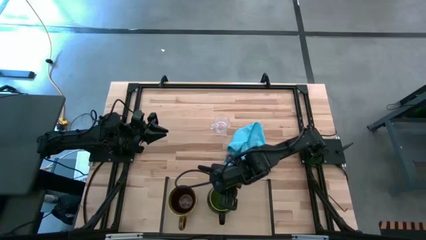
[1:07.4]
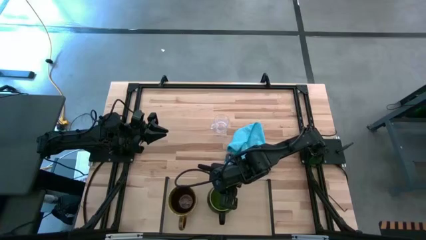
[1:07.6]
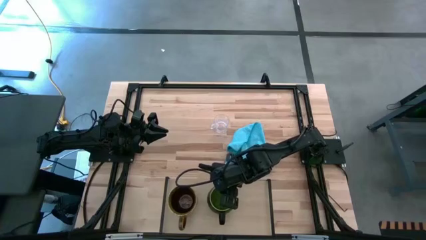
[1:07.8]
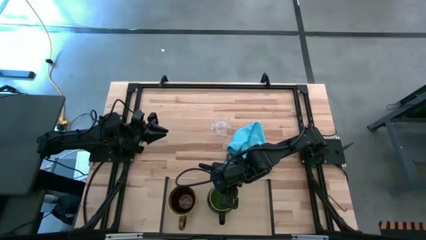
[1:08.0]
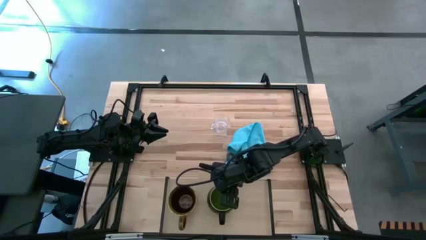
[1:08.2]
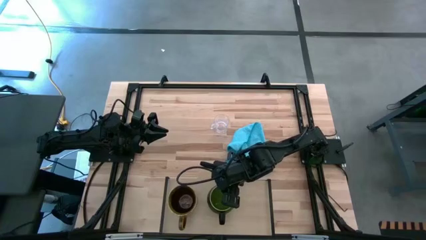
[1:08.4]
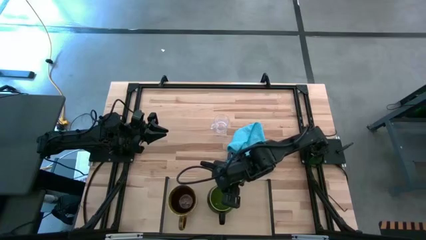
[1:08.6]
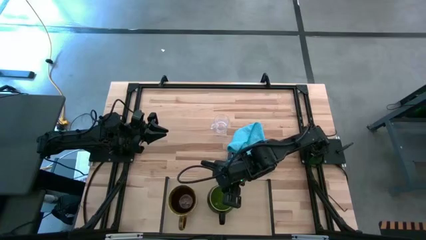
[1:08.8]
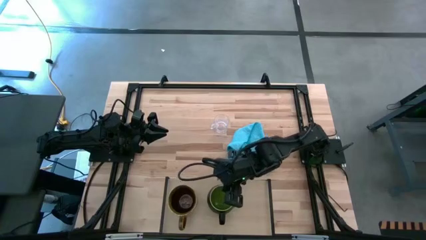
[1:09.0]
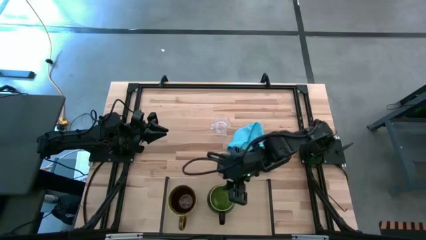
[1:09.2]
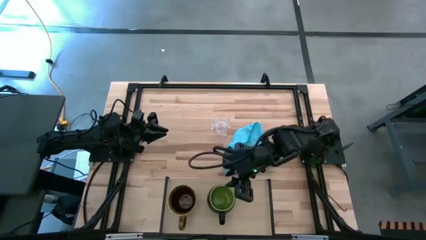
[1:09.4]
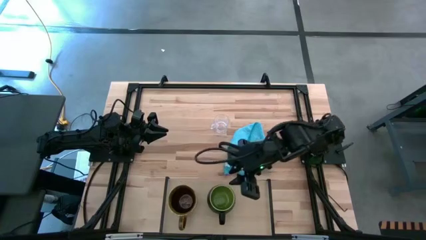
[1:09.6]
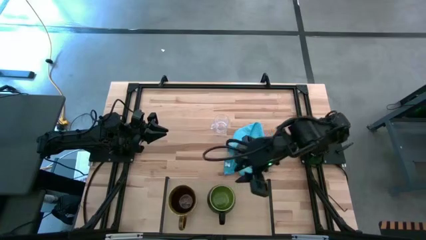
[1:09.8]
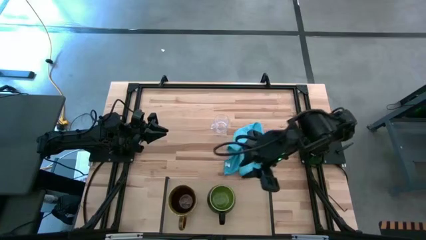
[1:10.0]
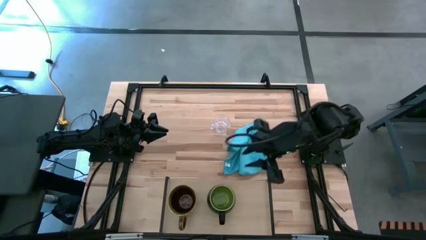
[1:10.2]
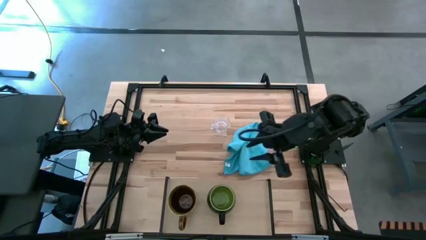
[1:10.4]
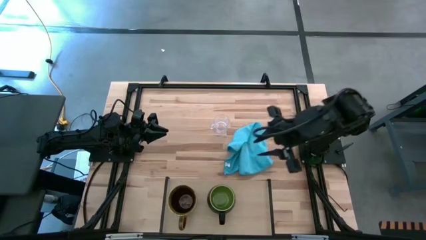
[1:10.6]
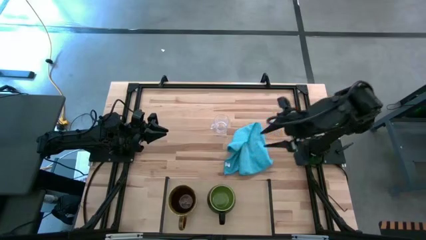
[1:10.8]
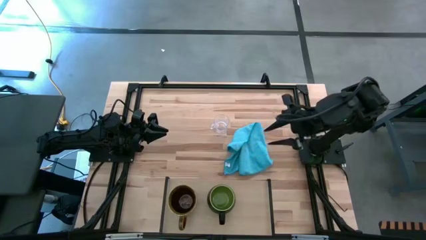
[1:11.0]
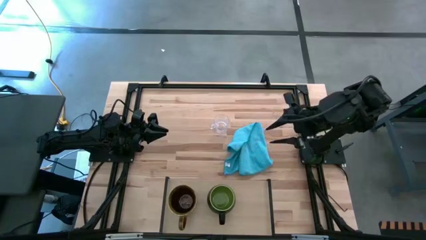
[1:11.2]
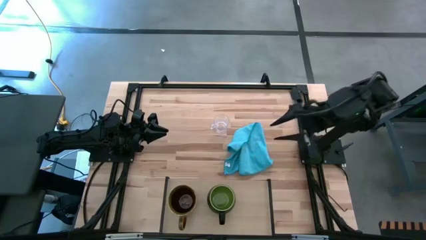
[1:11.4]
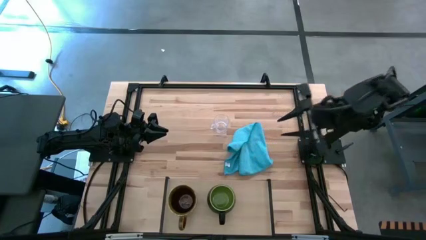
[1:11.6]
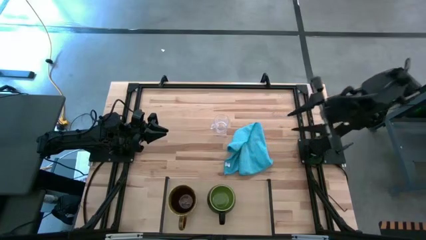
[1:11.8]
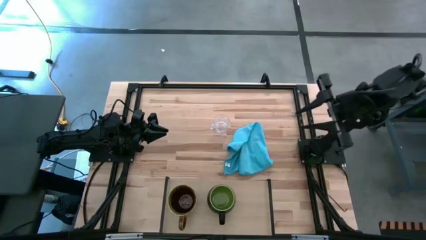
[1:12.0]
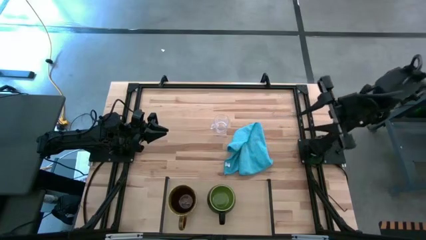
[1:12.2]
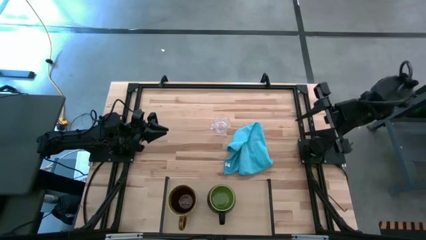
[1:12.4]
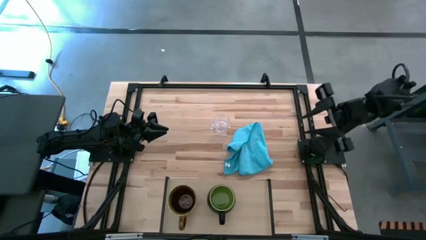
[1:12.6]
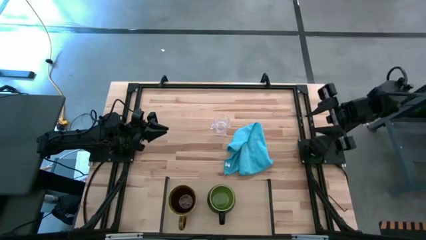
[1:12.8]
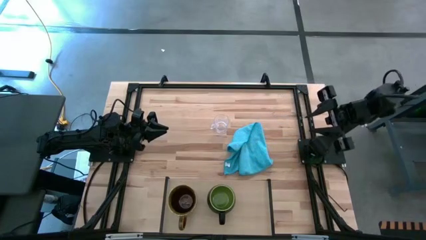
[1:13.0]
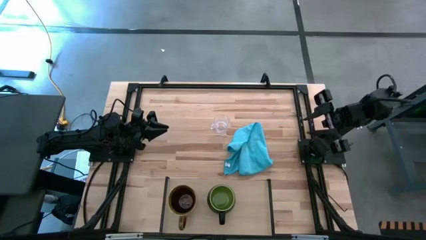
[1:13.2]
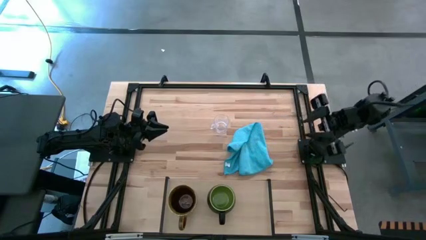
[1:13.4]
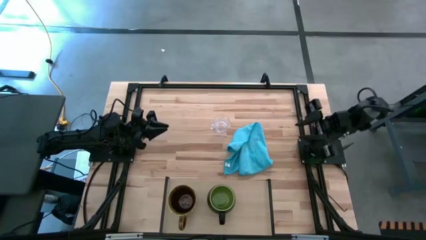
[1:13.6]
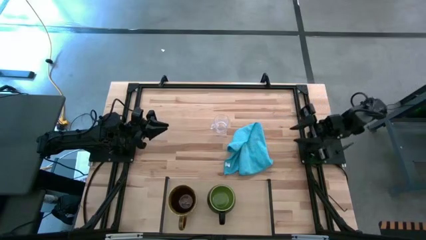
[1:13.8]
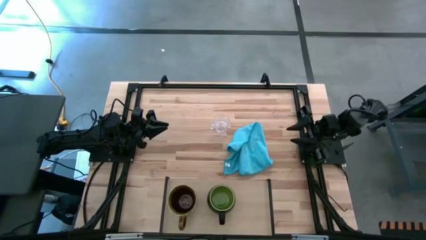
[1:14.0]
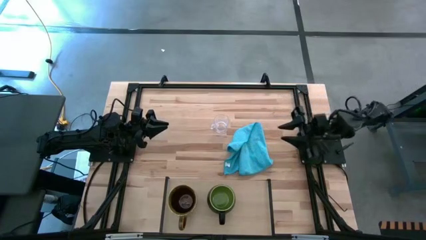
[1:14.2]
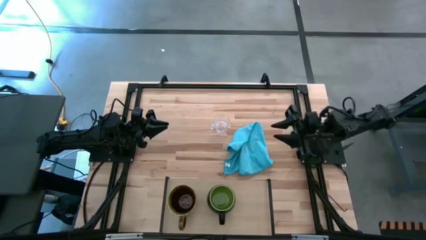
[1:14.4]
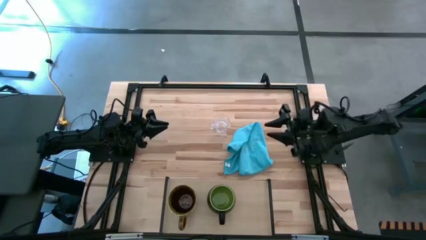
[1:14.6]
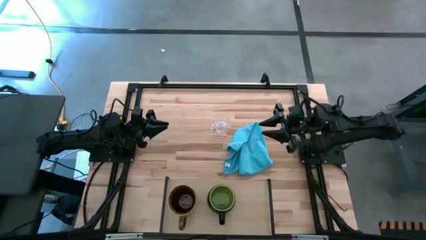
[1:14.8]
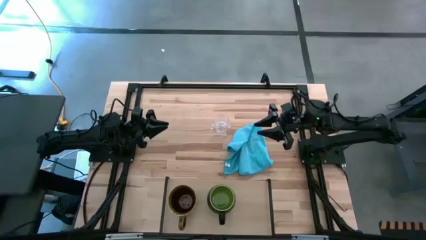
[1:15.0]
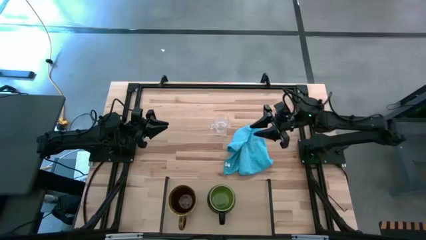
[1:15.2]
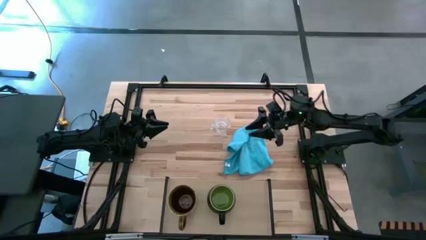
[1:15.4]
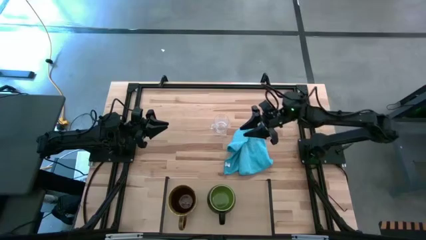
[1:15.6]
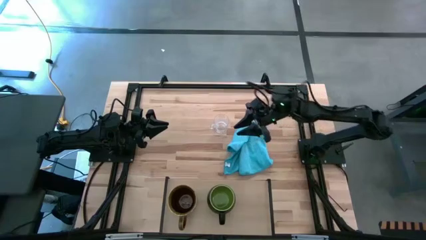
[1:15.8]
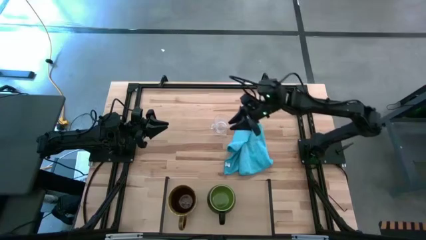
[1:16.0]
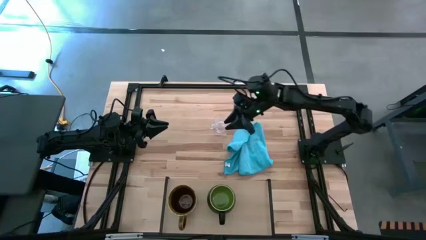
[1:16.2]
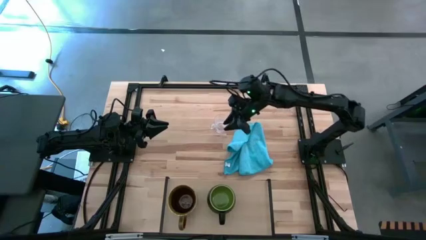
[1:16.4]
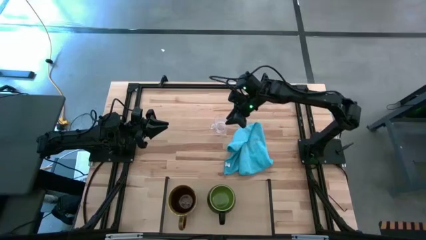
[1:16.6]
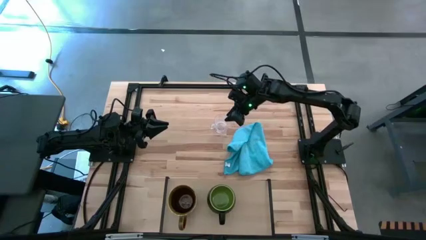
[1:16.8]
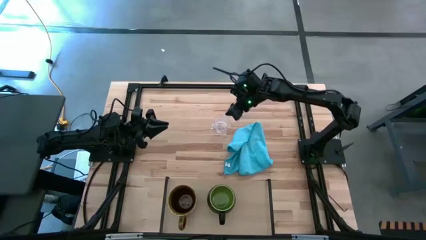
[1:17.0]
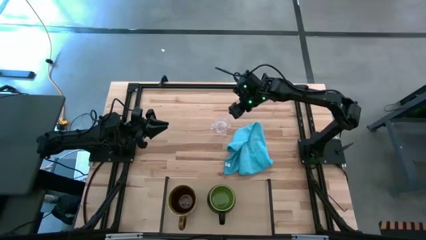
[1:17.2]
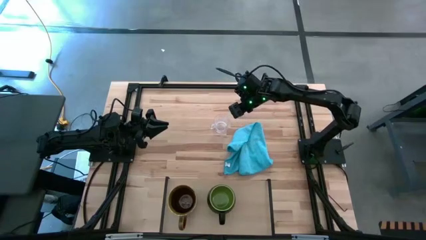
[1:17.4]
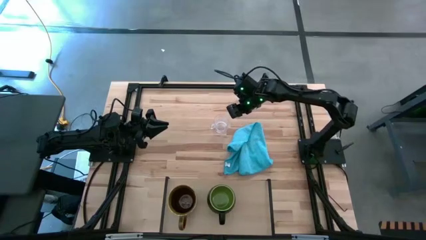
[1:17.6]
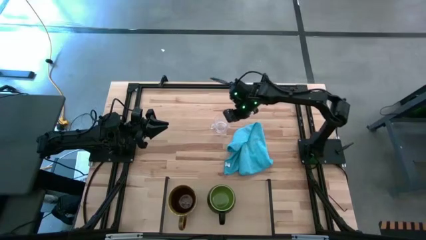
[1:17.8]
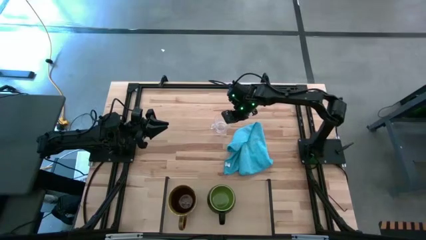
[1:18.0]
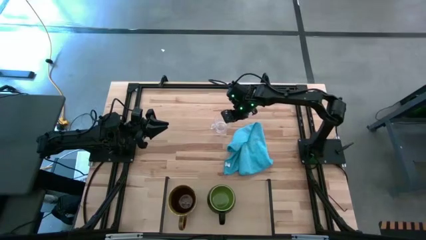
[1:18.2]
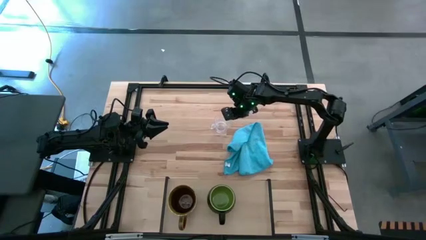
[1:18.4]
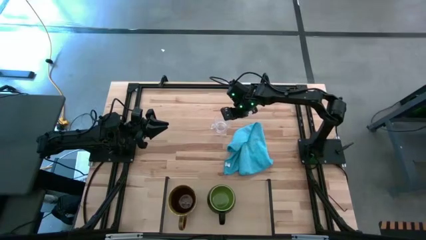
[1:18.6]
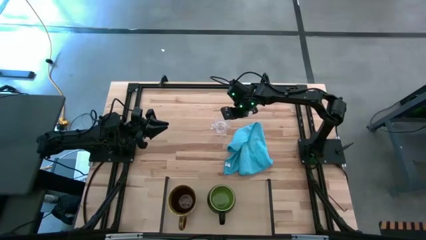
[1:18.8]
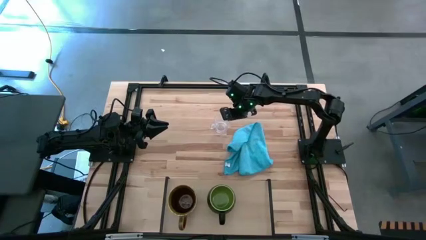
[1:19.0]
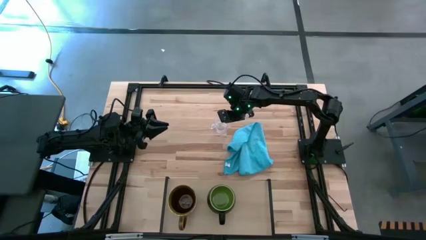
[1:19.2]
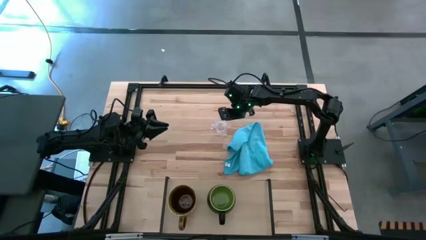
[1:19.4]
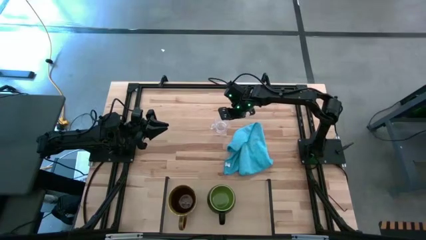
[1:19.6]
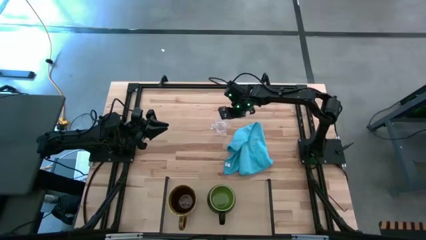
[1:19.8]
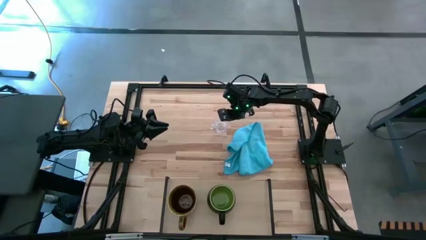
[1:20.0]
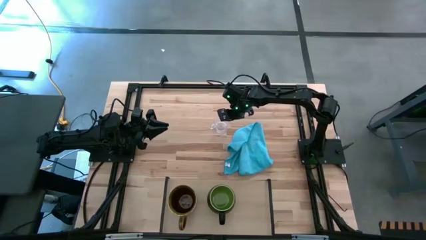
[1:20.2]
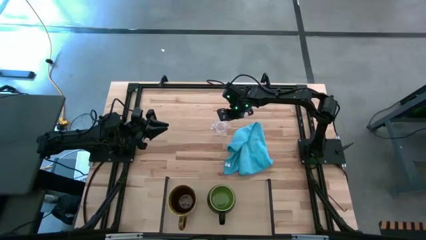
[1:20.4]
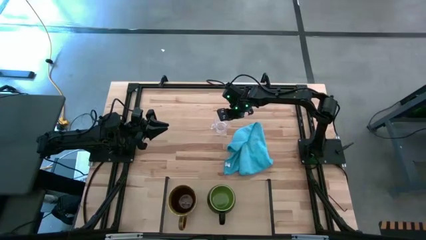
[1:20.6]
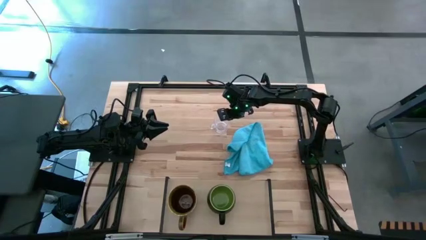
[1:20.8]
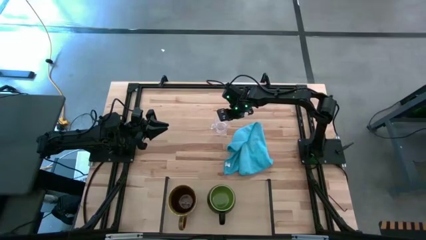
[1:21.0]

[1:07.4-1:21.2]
Task: Stack small to large cups/mugs on shelf
Put the transparent mug on the shelf

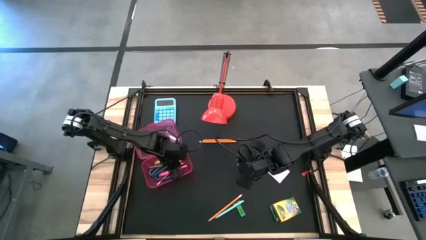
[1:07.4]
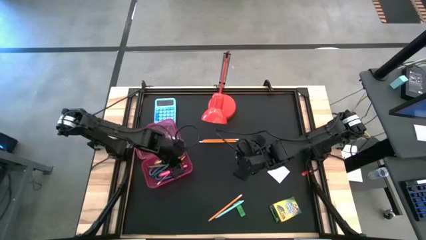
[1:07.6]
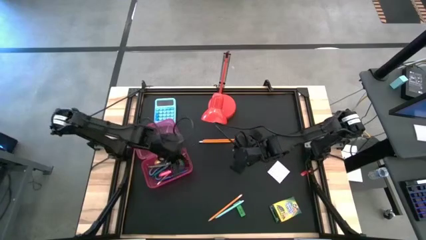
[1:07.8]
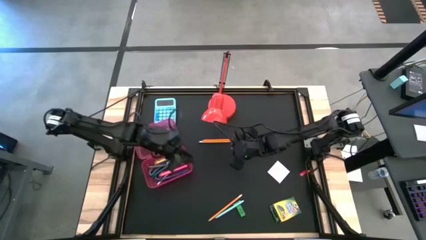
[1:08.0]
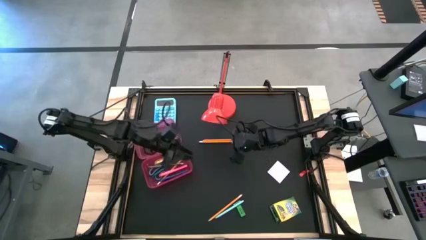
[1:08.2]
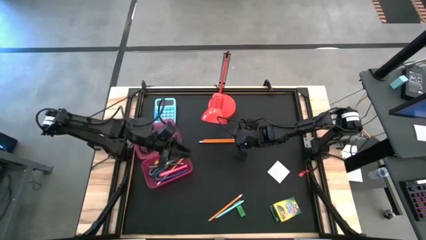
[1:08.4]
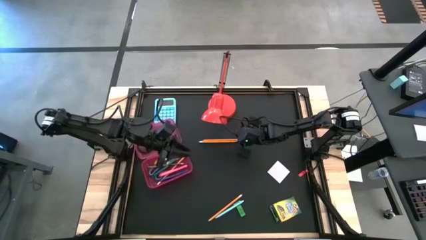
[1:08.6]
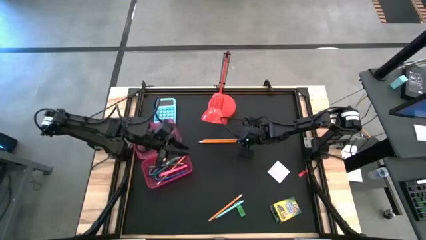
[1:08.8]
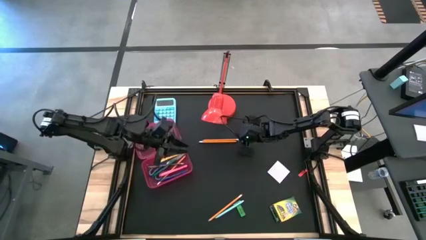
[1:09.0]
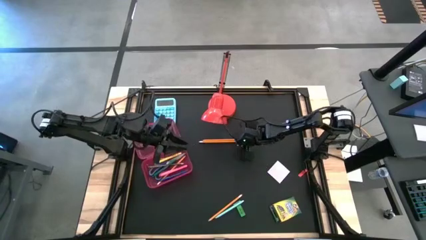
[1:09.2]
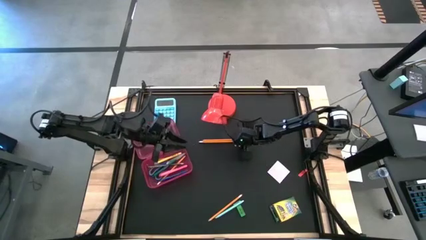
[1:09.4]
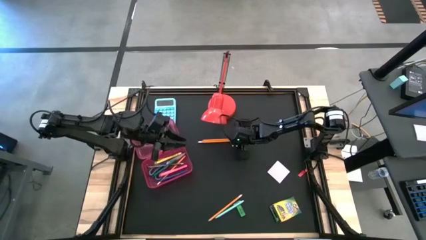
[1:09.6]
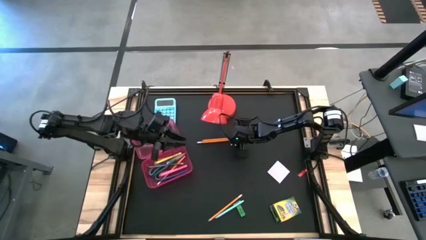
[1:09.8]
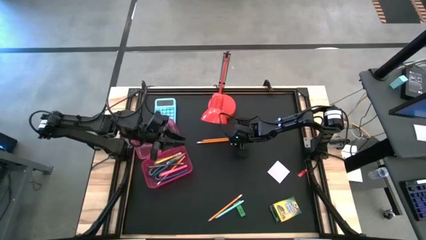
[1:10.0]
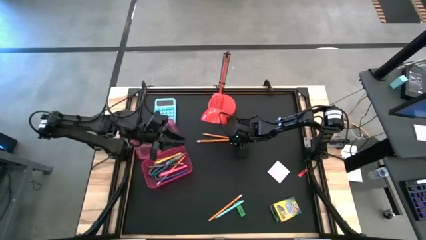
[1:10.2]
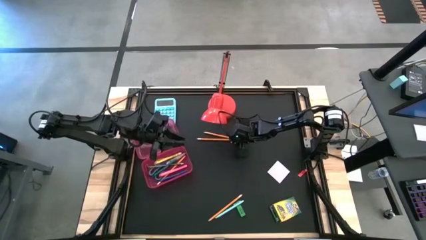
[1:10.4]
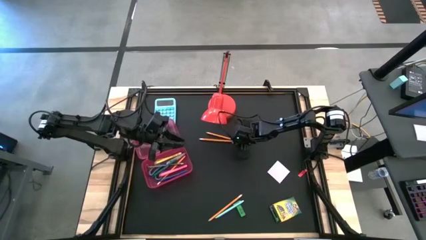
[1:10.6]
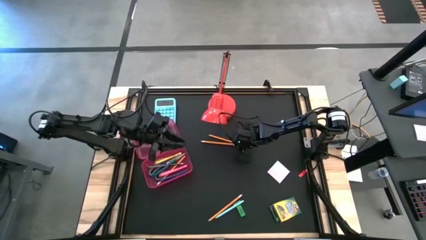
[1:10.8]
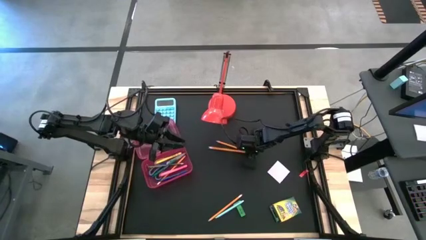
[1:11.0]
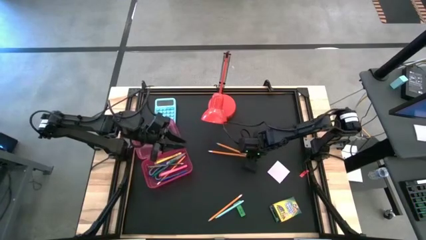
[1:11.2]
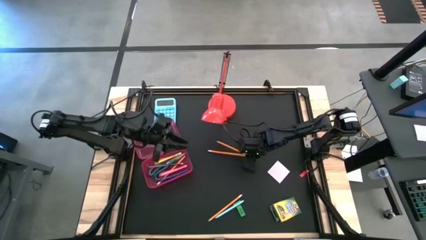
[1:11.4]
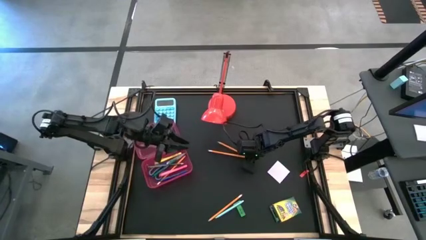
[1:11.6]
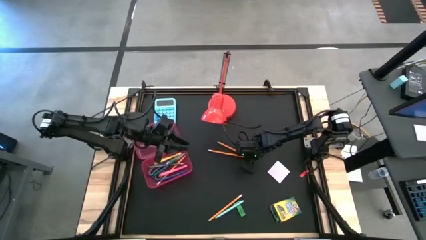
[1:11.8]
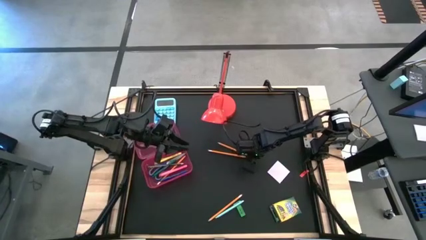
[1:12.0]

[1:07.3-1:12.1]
Task: Pack school essentials
Put the orange pencil into the red supply box
